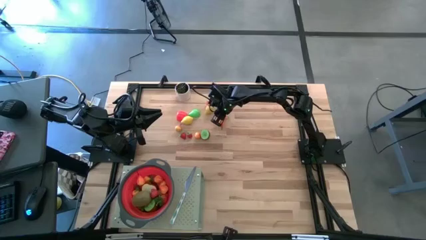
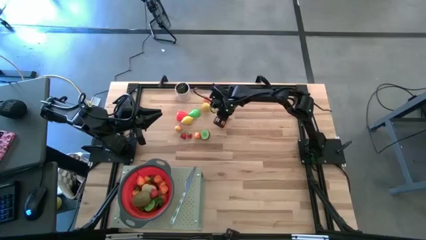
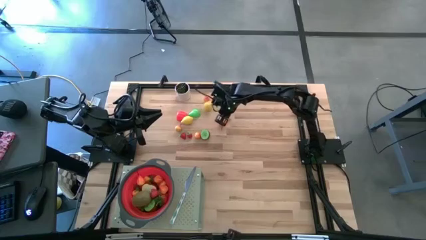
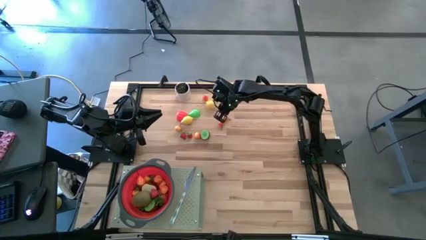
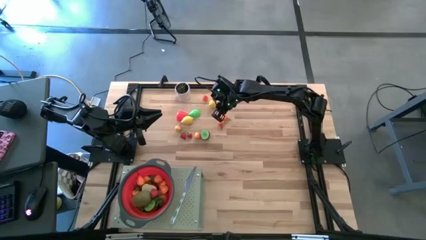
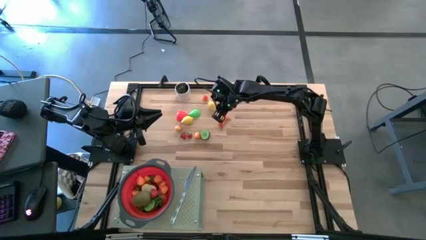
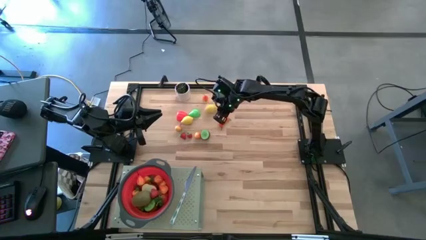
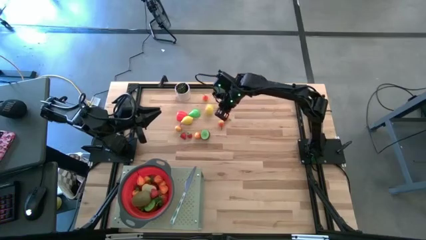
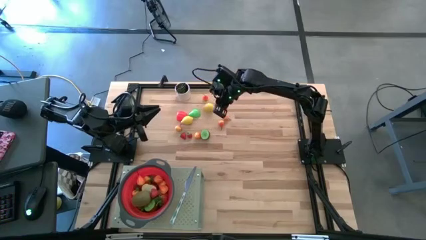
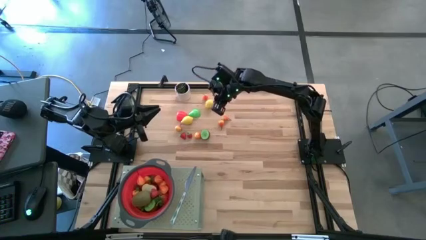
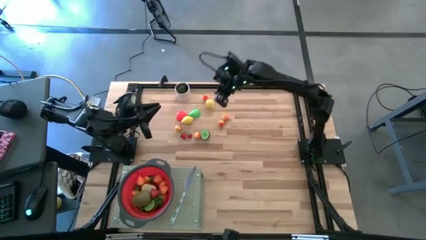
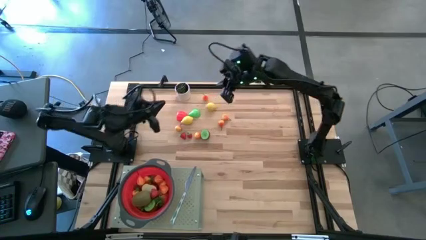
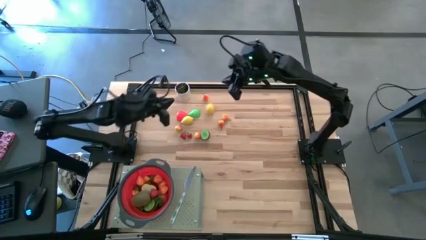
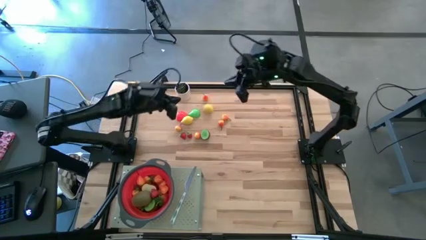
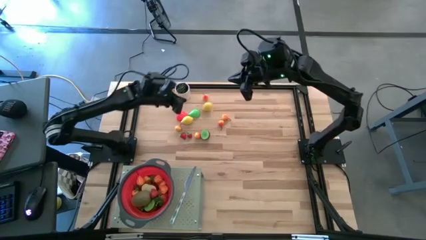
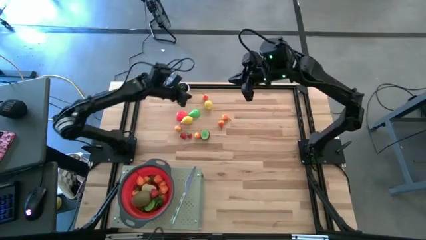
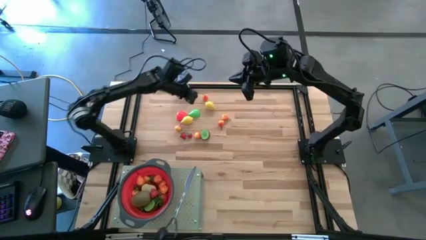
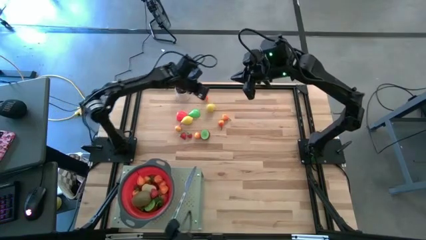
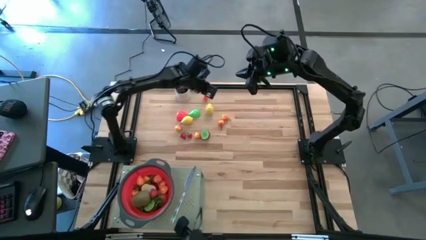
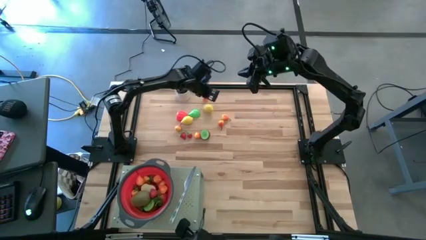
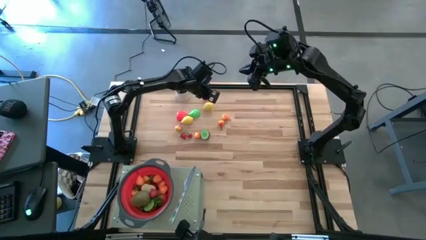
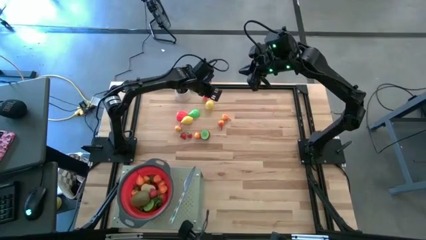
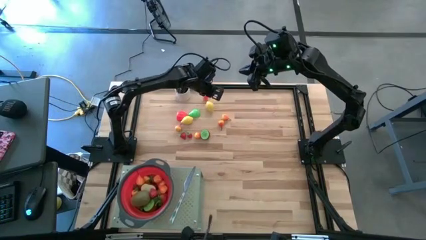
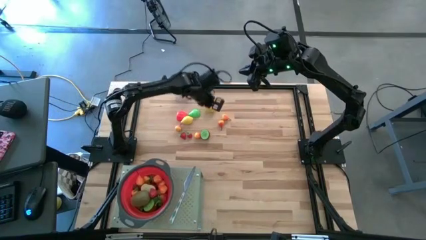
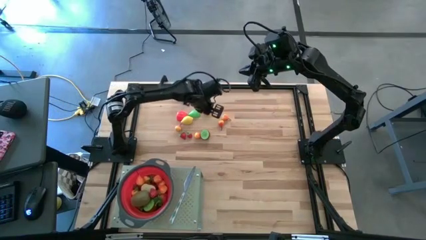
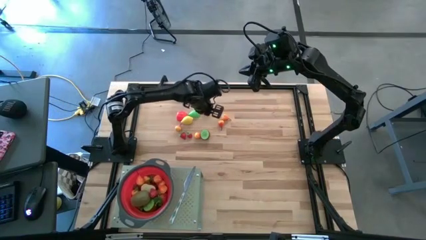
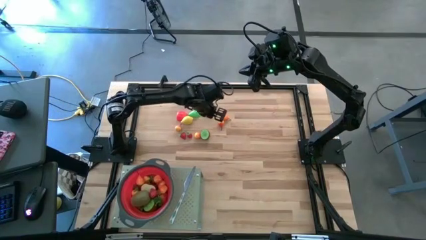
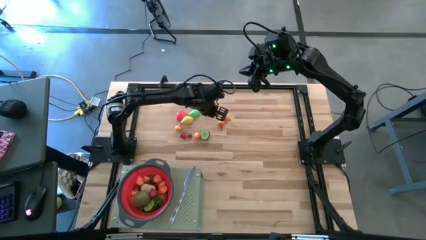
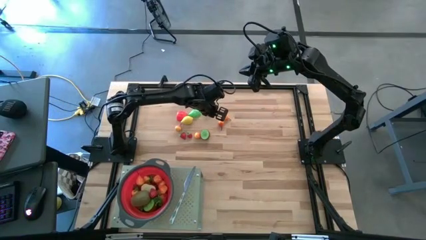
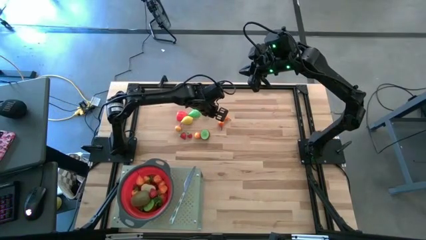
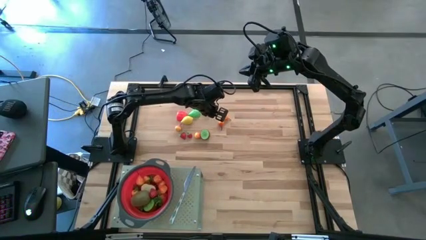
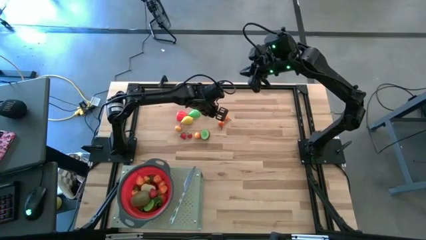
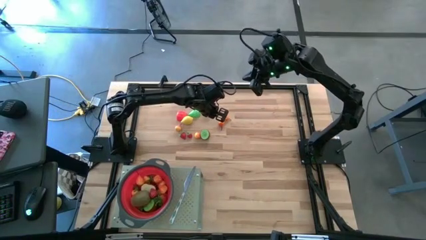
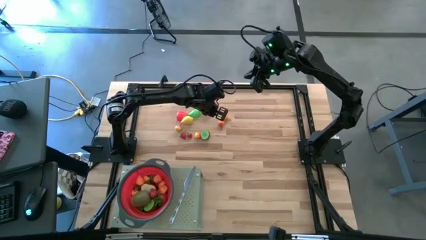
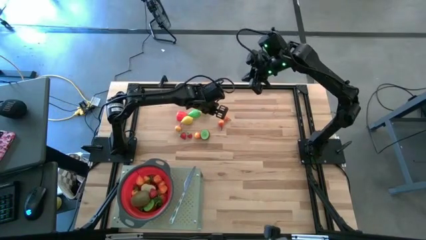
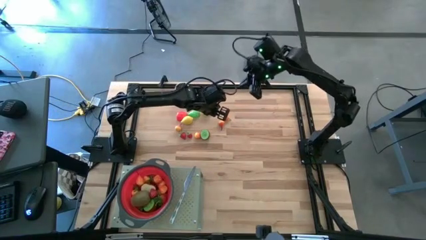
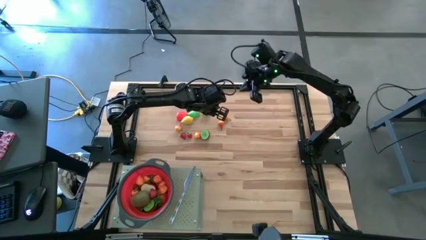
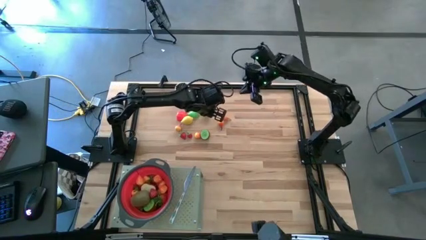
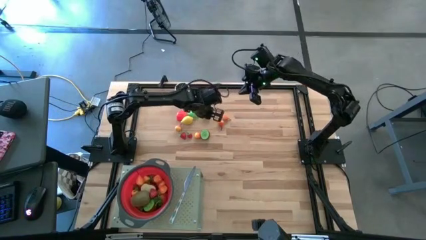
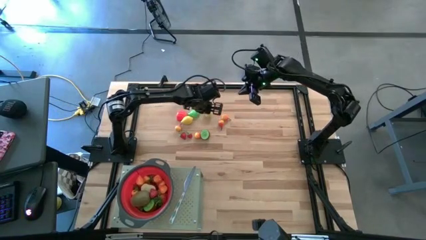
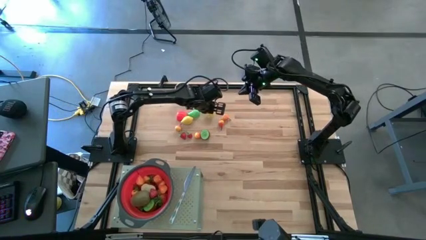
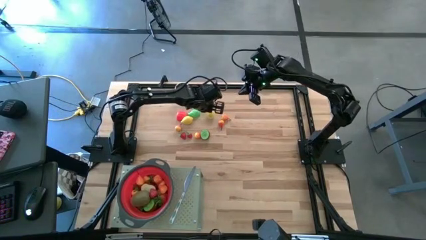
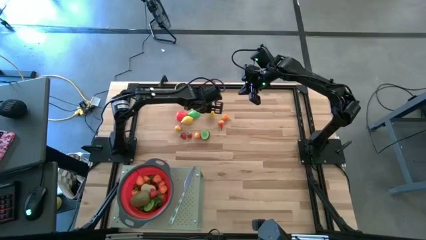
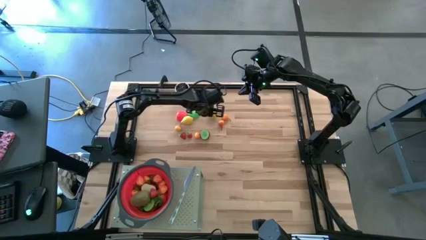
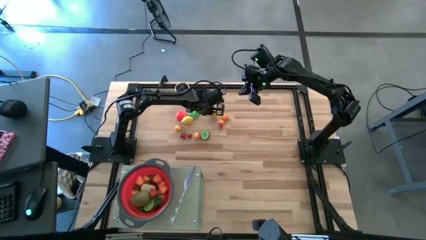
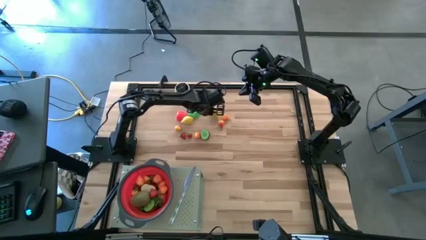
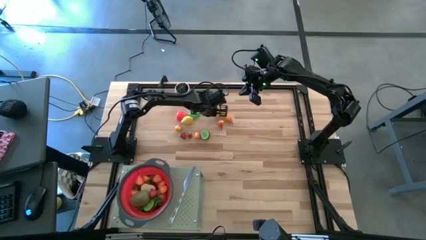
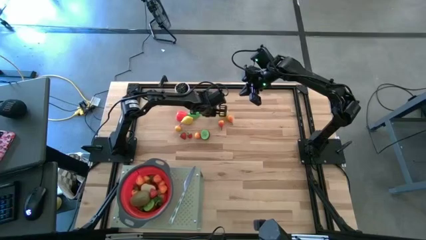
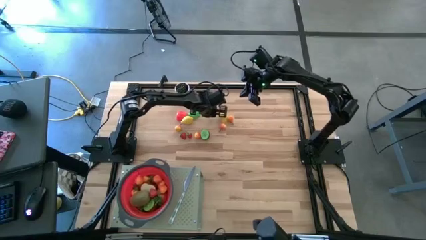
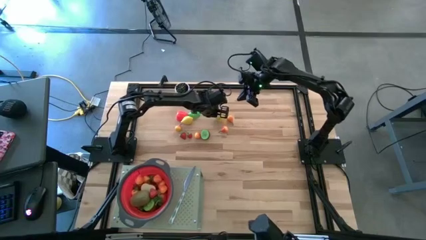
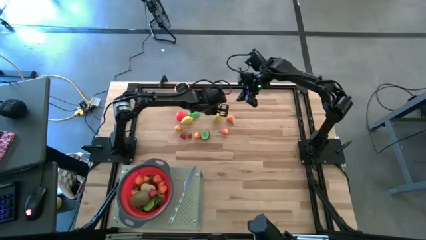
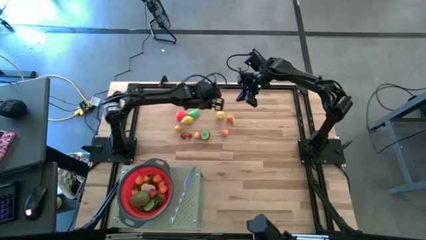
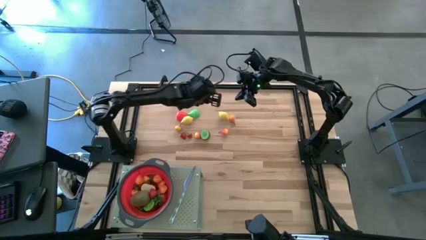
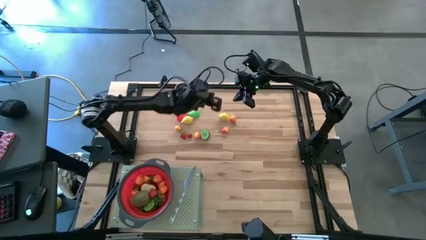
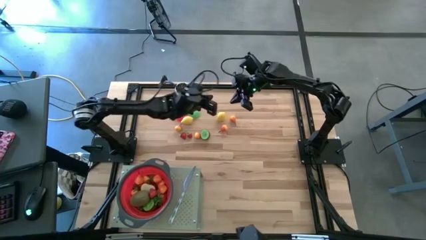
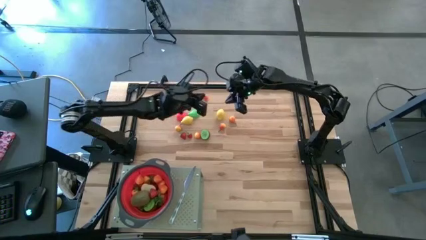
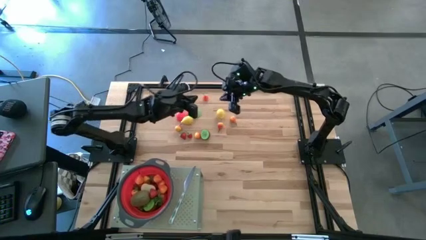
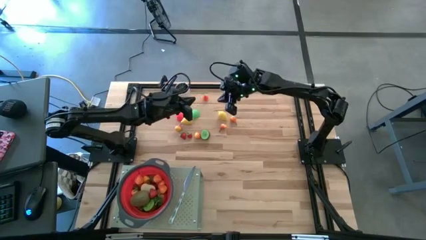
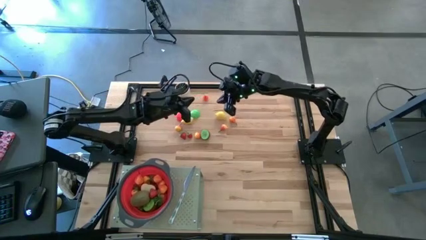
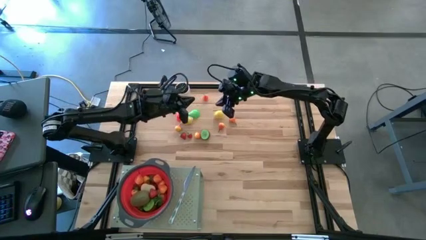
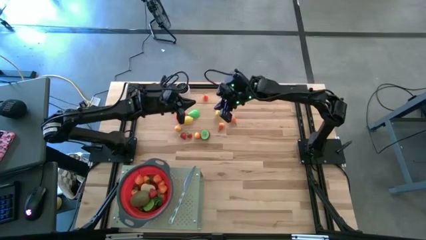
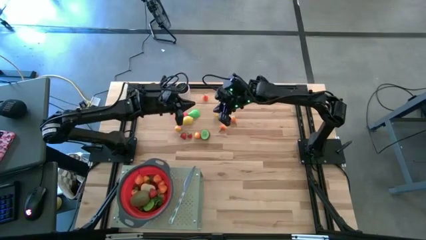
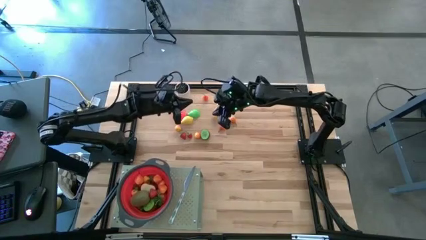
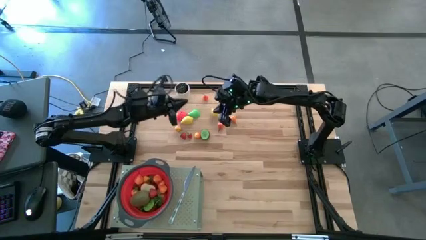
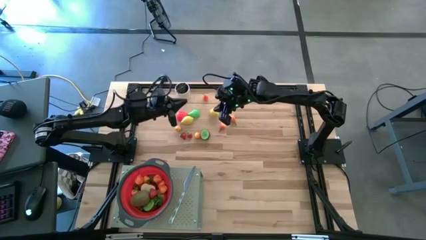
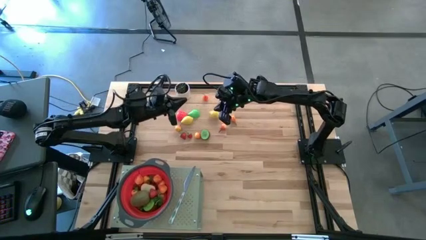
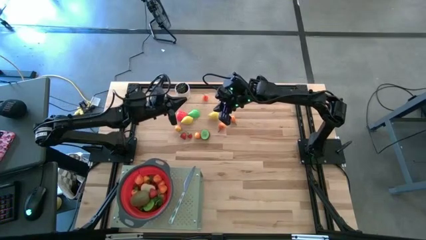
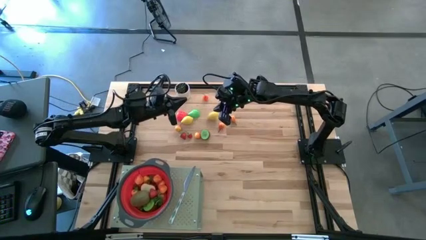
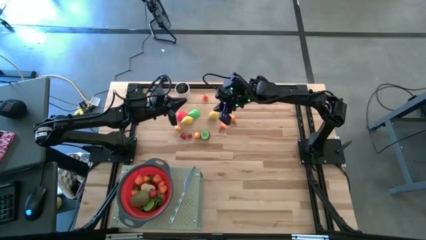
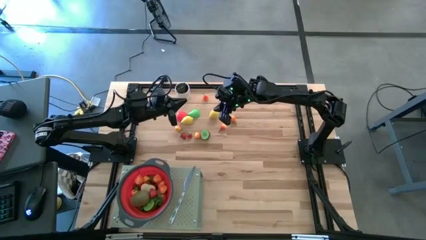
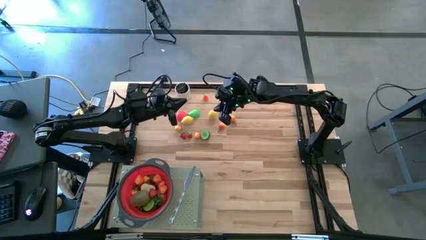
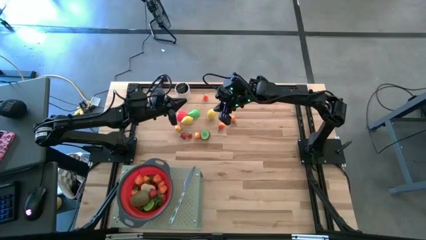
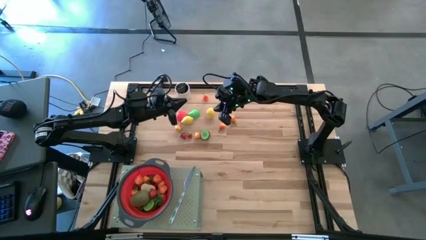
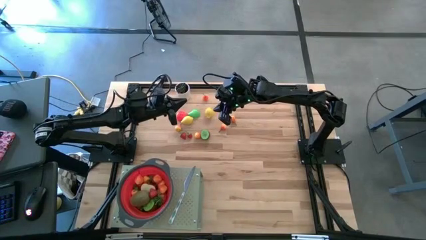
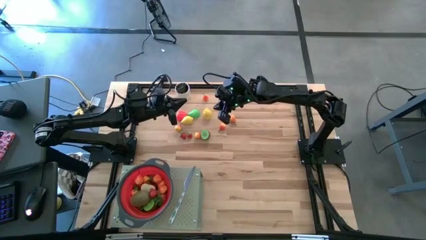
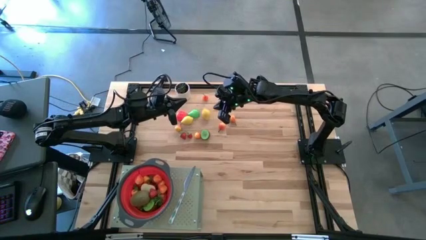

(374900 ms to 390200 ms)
Task: Pick & Place Fruit
Put the lemon into the red strainer bowl on the shelf

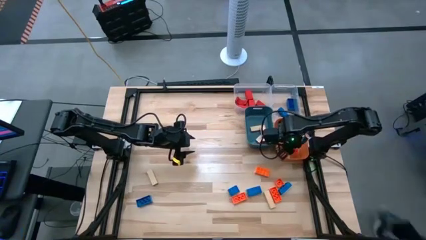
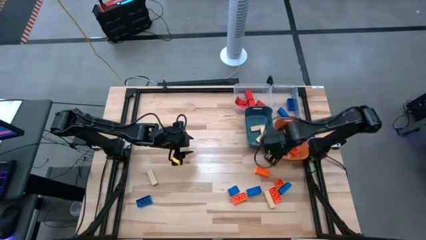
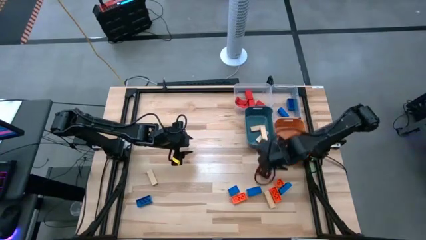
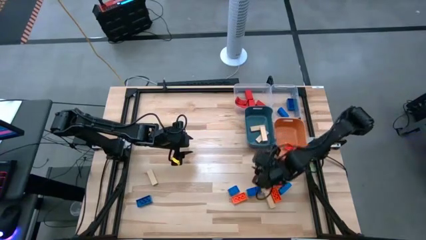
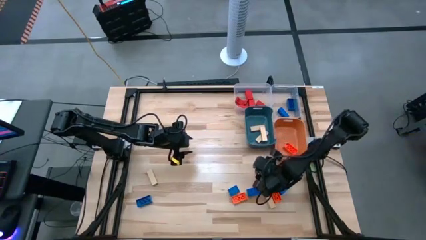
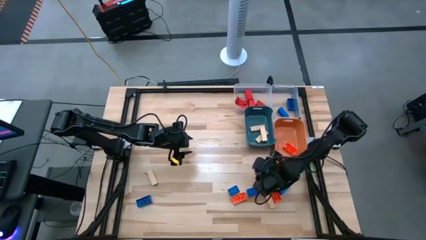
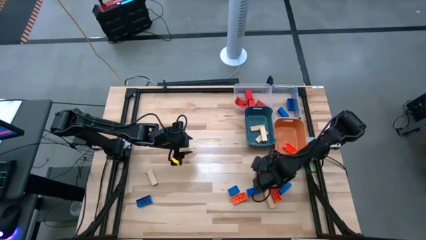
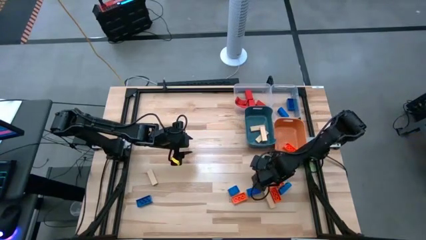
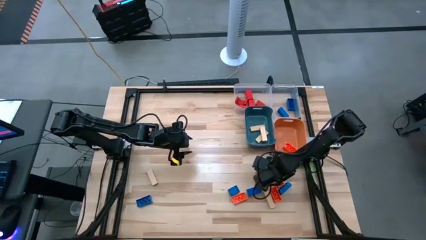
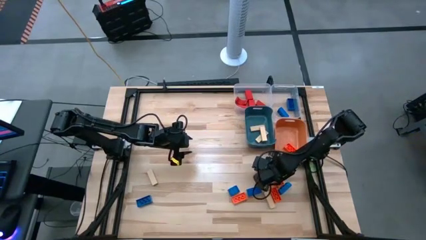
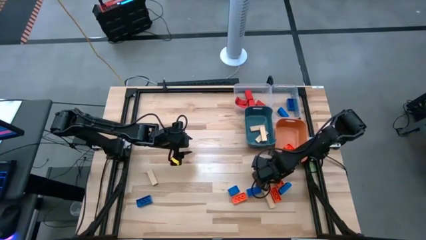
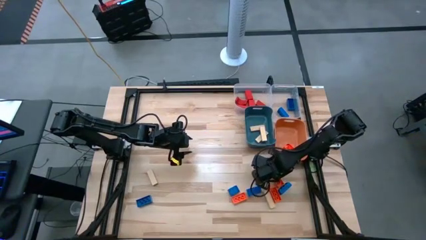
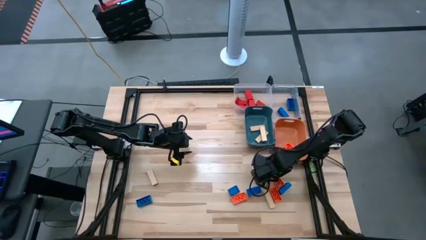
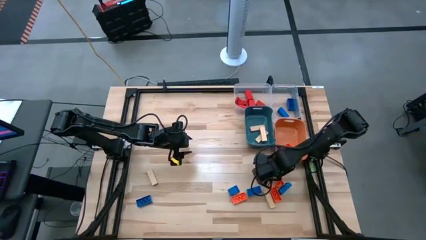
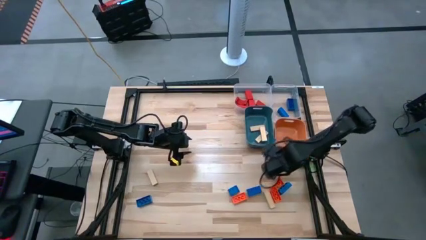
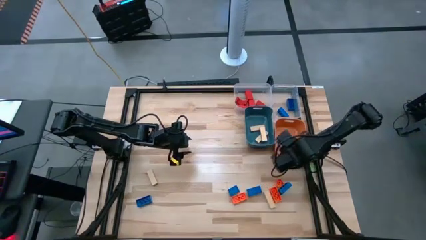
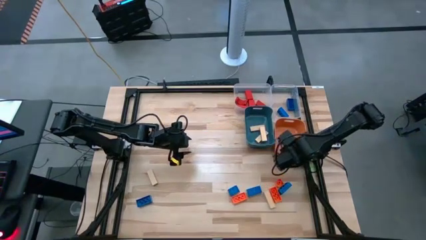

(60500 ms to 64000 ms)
Task: Sort blocks
Put the 8 stud orange game piece into the orange bin
